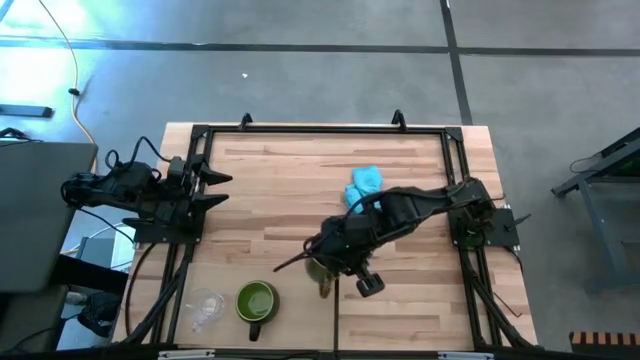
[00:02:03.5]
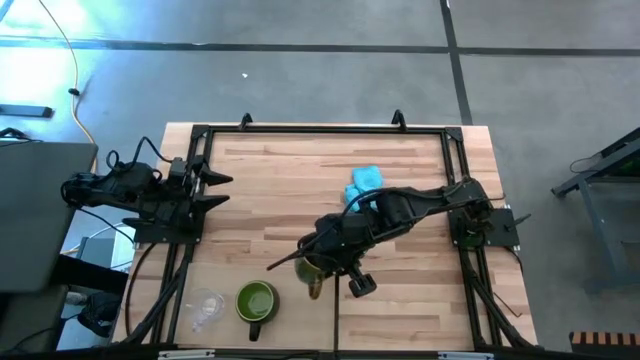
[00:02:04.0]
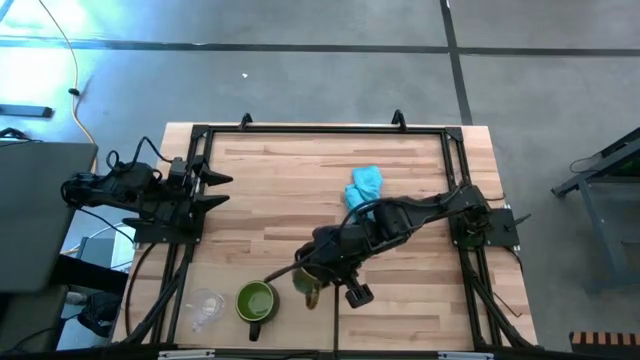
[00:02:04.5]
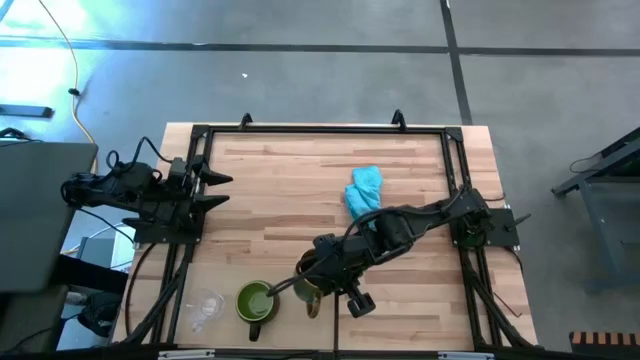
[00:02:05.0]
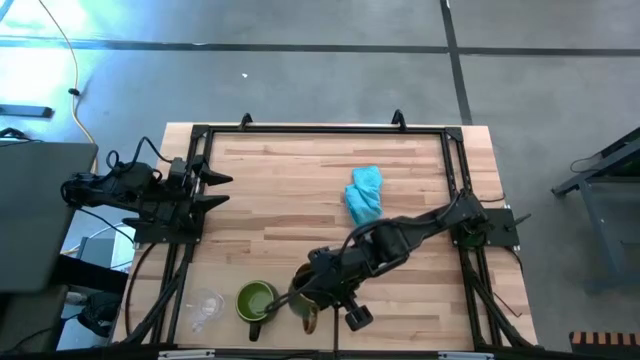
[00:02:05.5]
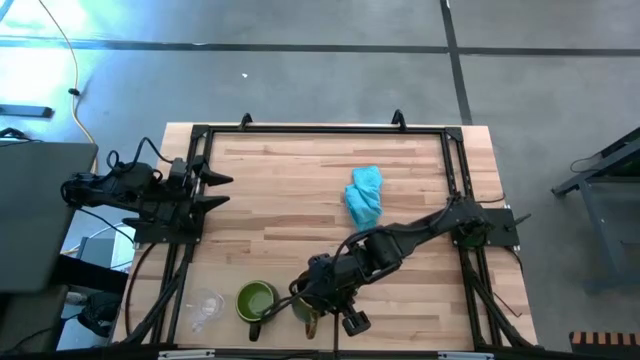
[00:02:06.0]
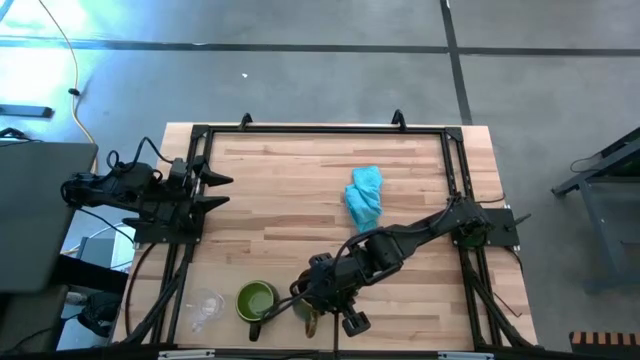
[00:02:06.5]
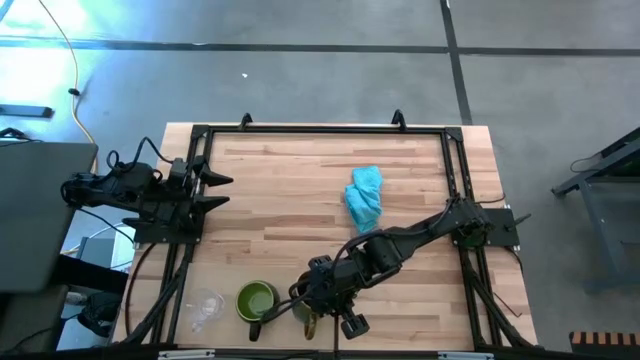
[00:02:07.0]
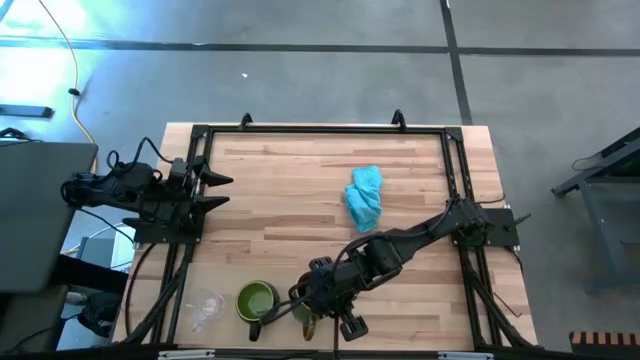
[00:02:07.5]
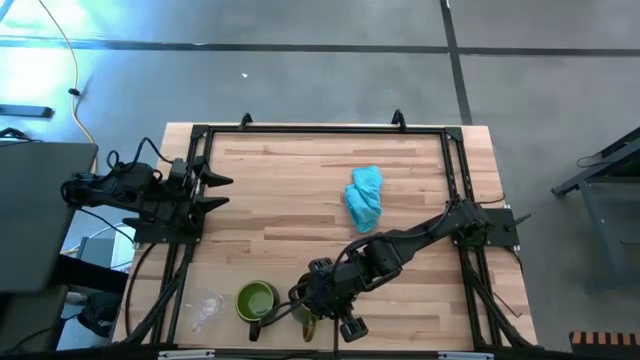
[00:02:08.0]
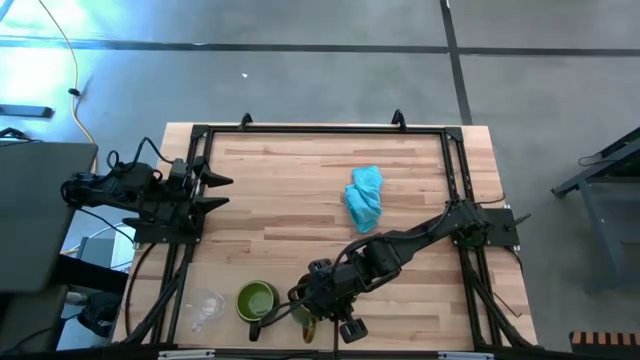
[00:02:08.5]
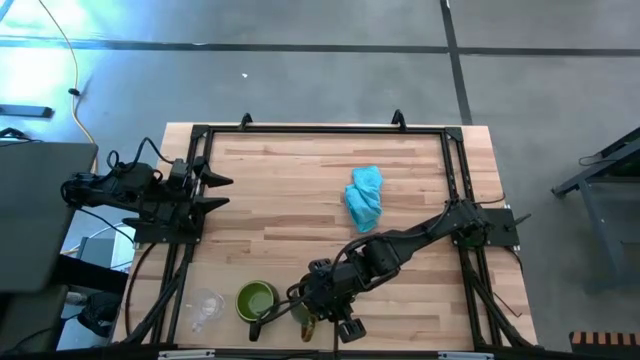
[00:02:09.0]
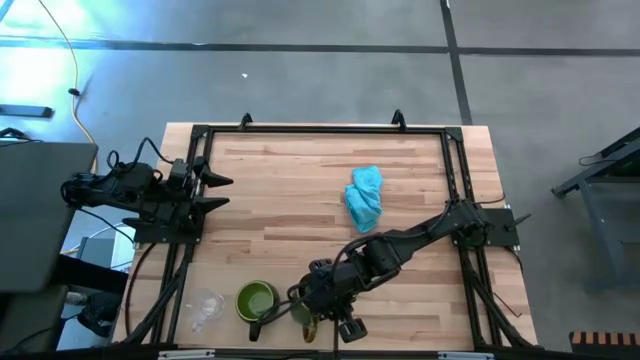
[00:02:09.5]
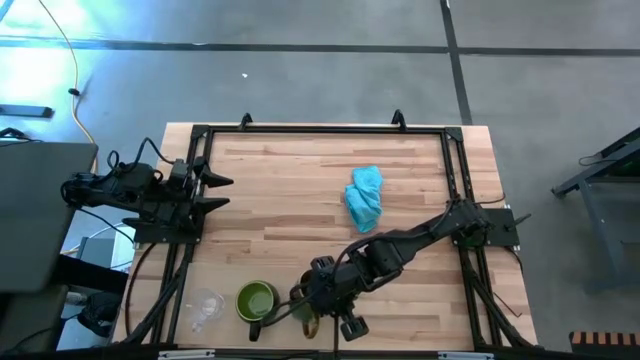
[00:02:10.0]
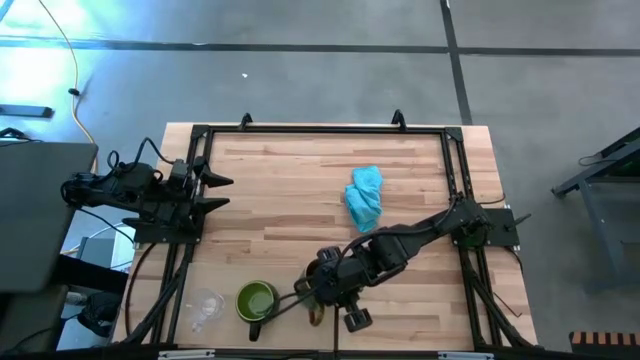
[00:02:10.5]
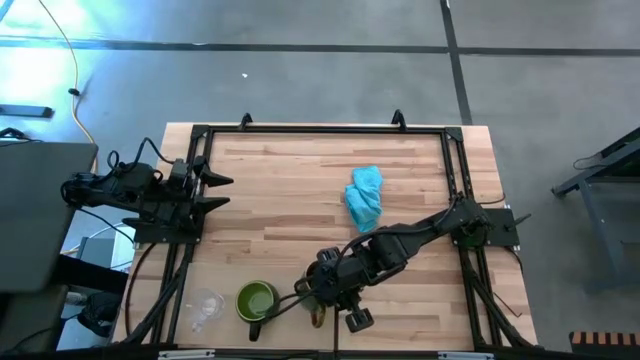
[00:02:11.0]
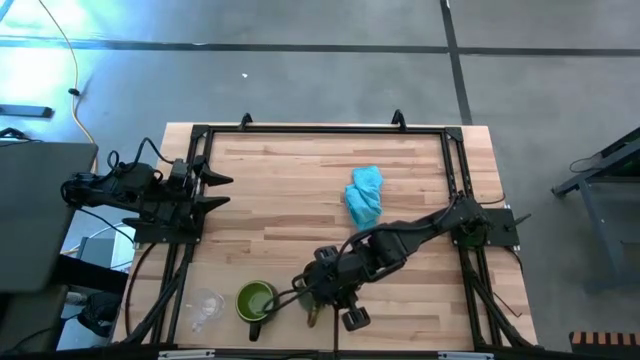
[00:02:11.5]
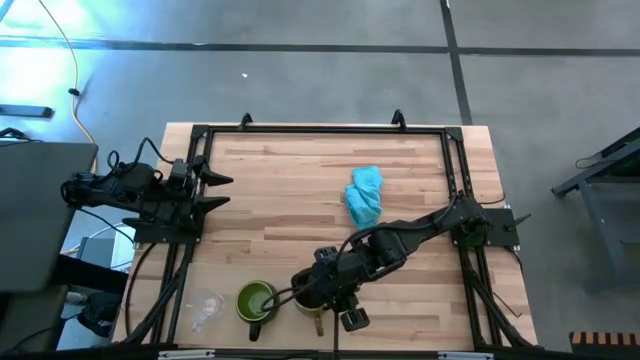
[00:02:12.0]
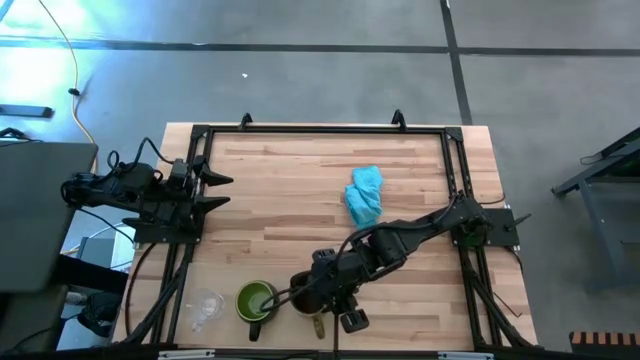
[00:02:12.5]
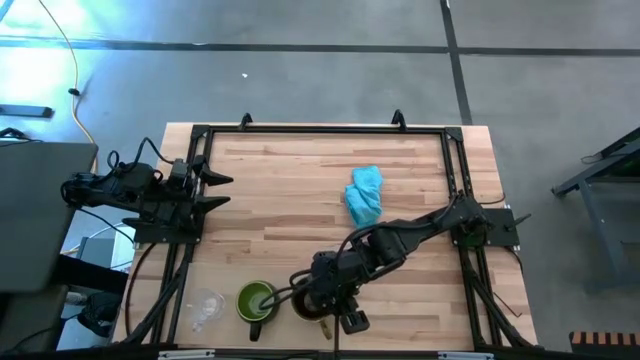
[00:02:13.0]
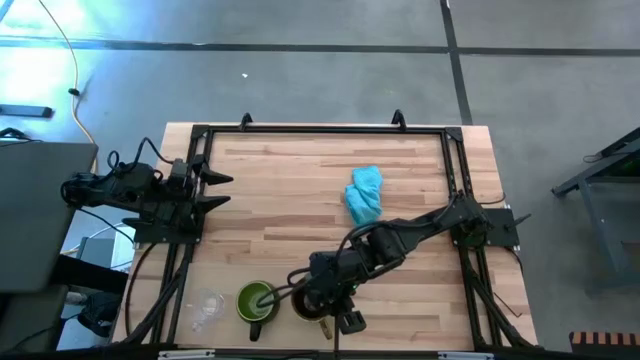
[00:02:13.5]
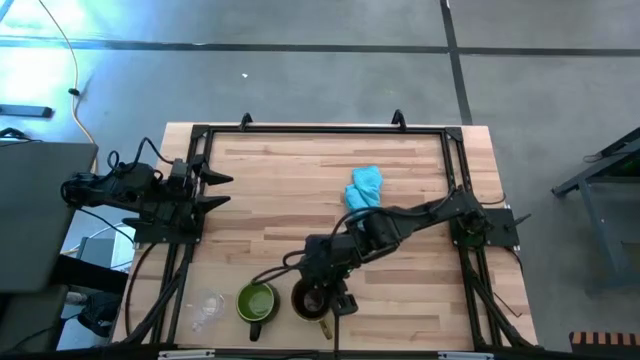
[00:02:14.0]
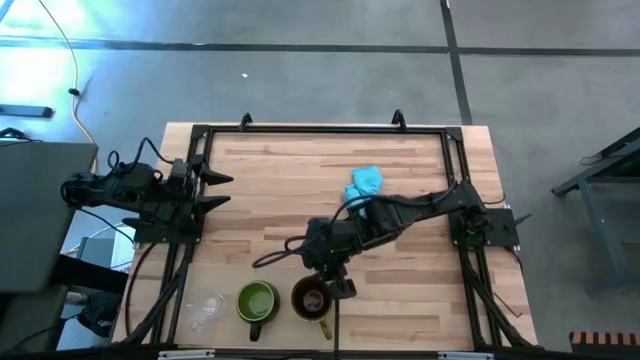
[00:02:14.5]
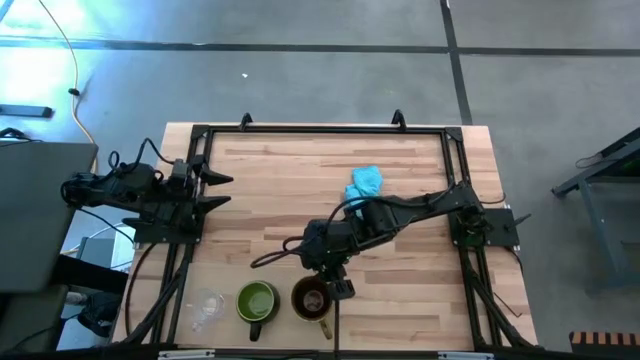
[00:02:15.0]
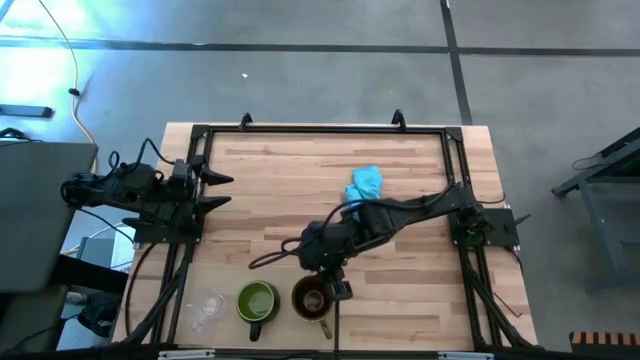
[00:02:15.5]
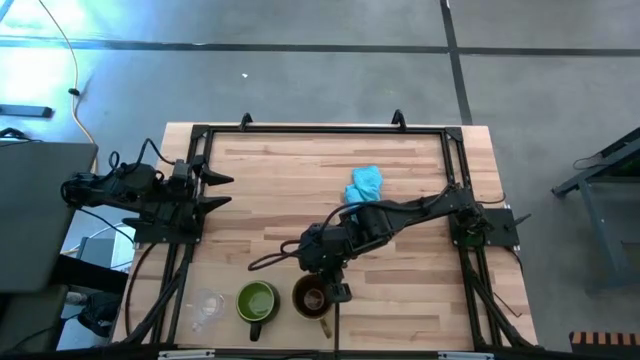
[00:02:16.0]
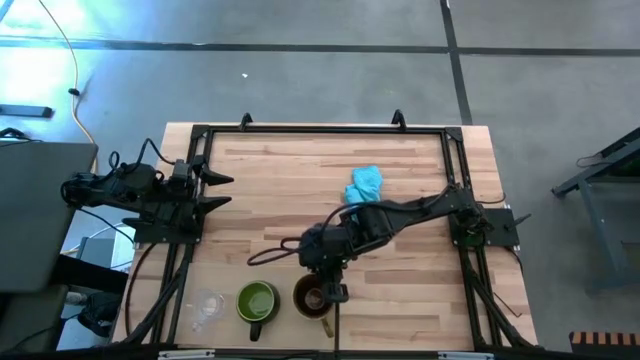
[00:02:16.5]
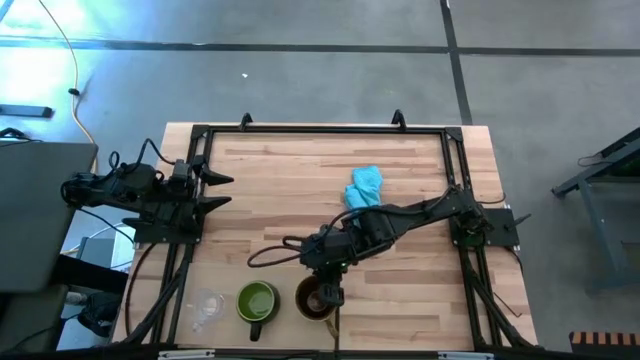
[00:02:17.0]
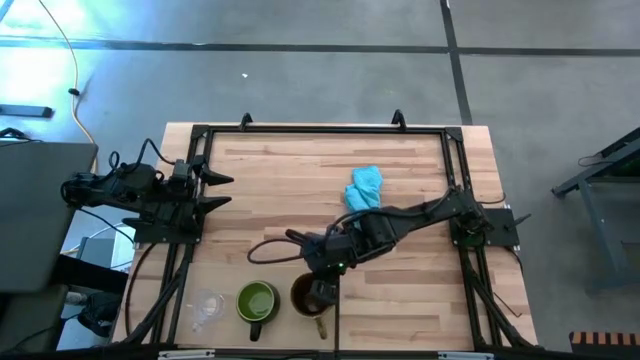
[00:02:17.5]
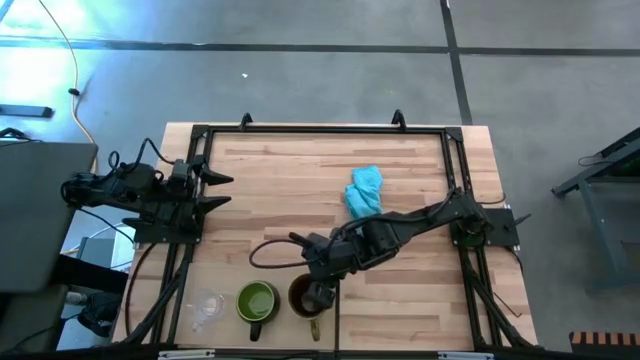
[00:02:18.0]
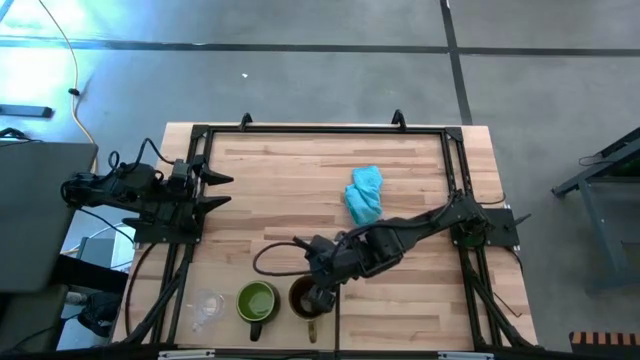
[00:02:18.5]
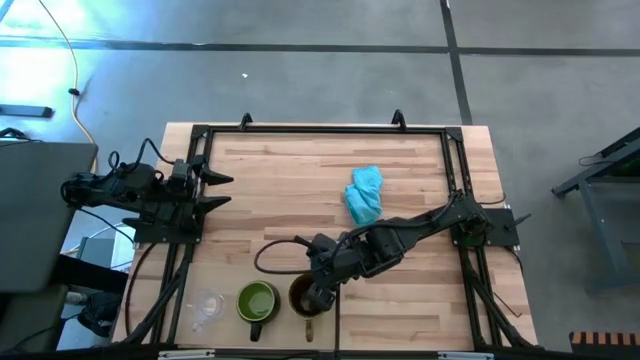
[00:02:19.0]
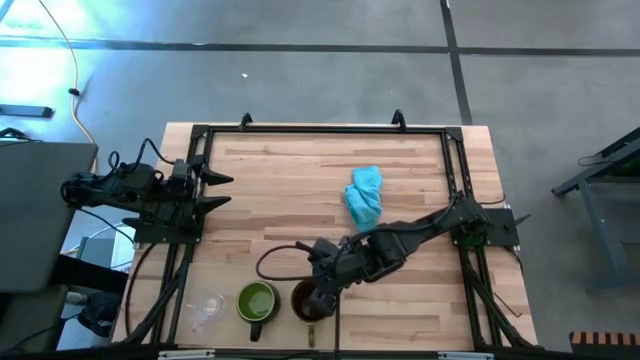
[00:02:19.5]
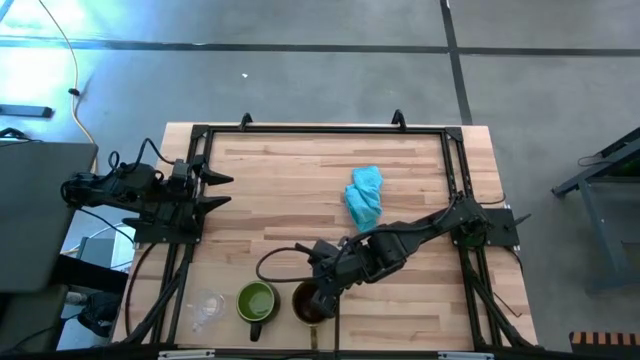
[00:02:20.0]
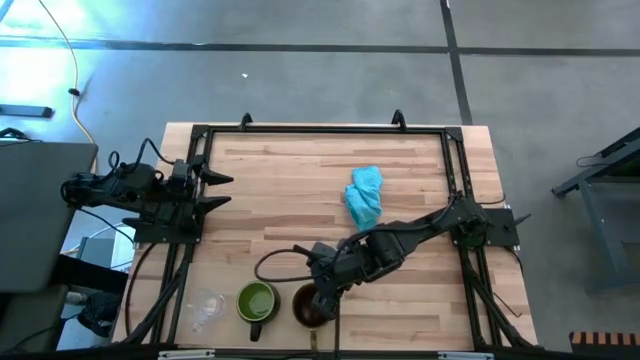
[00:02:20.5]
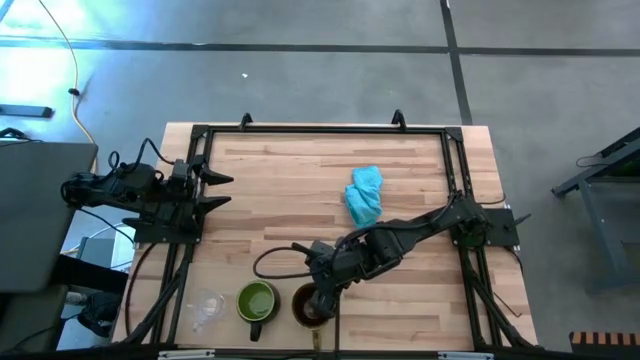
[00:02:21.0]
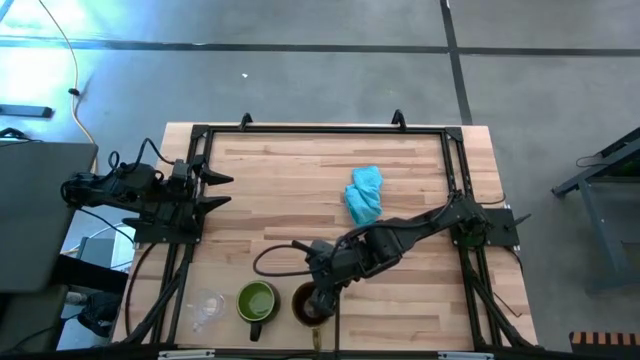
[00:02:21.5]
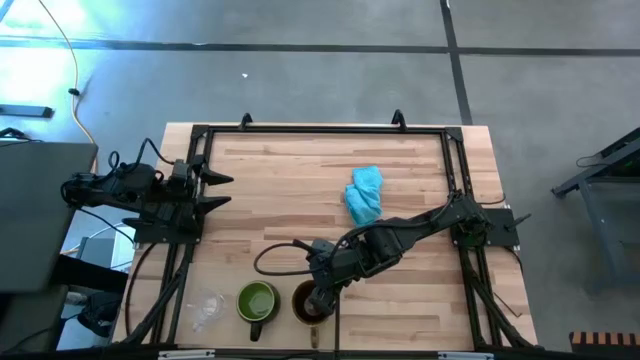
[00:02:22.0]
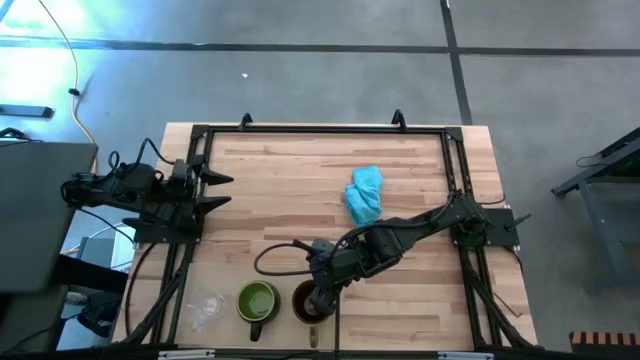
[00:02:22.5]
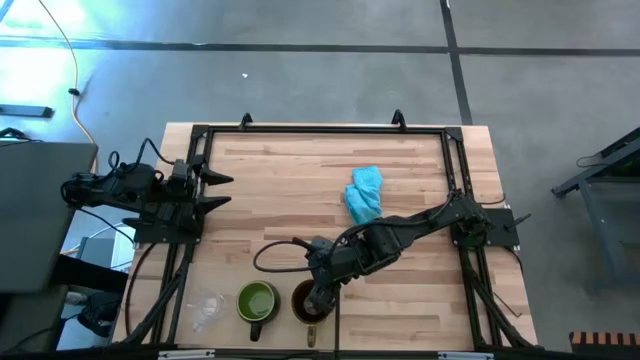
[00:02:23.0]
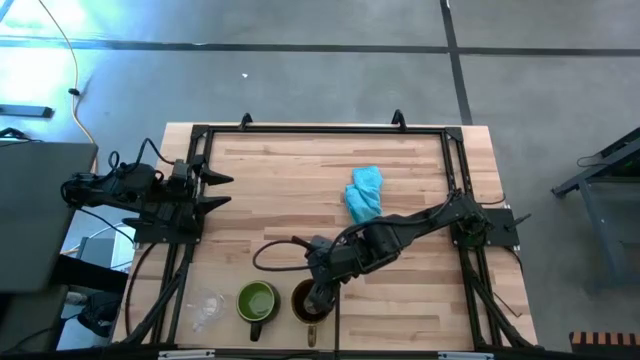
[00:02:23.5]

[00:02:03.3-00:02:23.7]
Task: Stack small to large cups/mugs on shelf
Put the brown mug on the shelf
